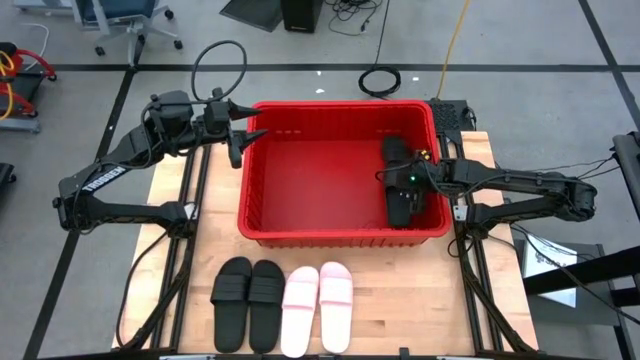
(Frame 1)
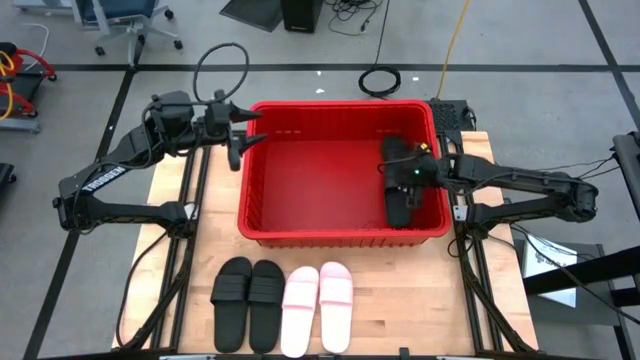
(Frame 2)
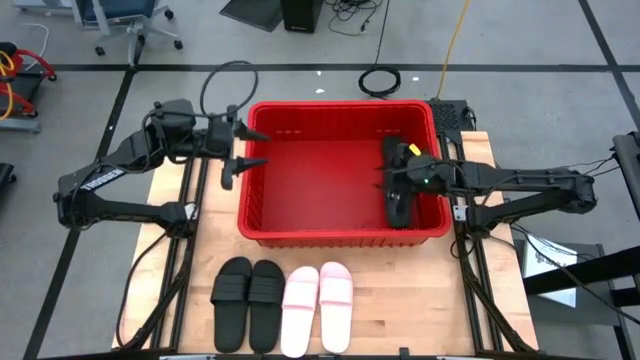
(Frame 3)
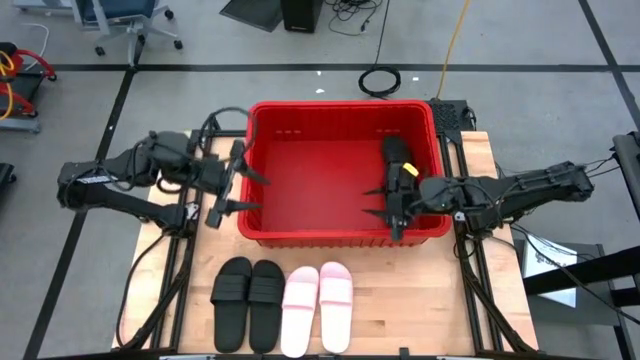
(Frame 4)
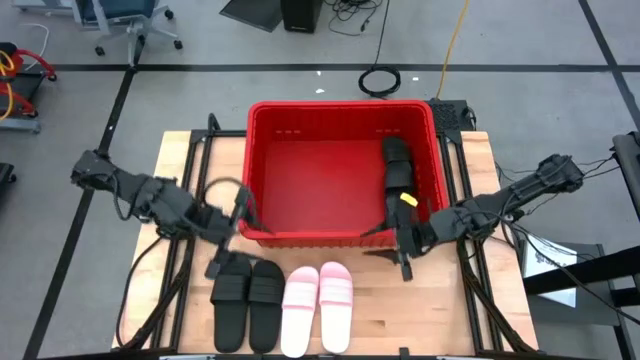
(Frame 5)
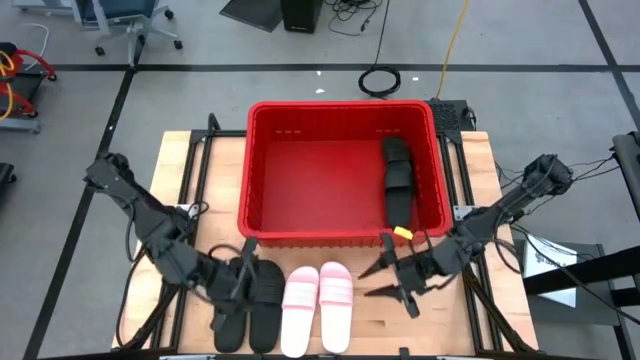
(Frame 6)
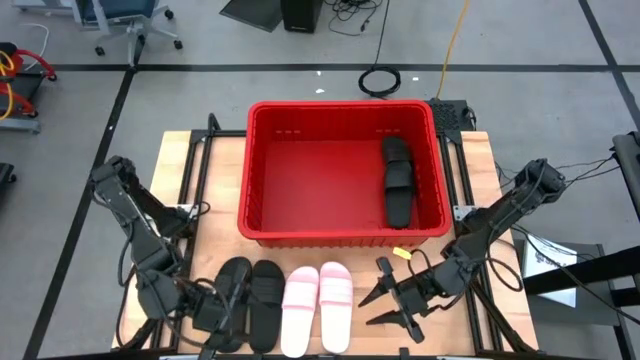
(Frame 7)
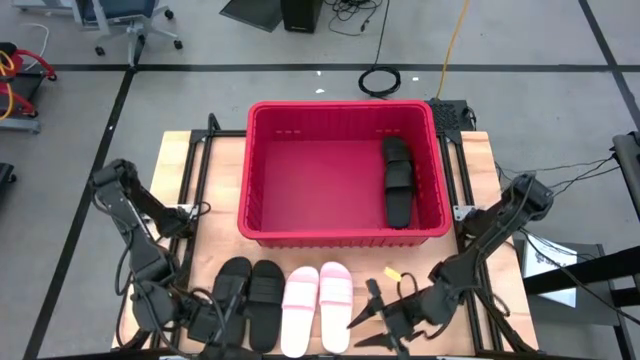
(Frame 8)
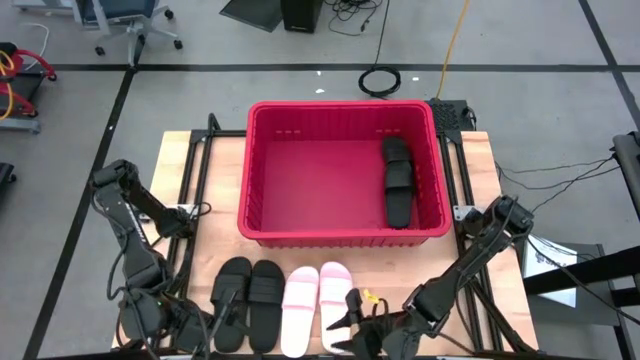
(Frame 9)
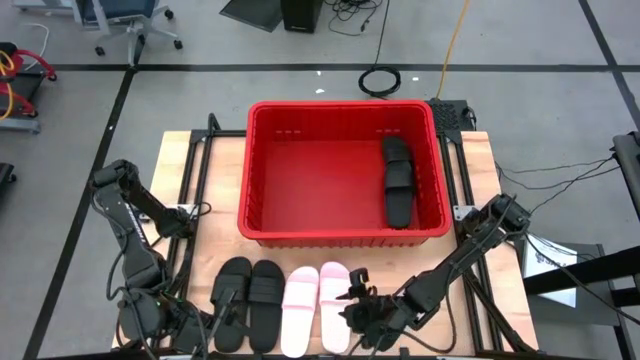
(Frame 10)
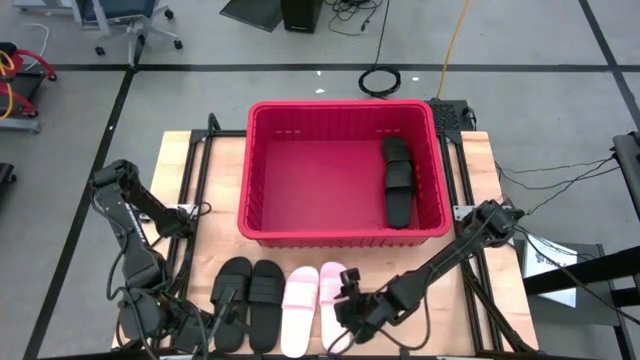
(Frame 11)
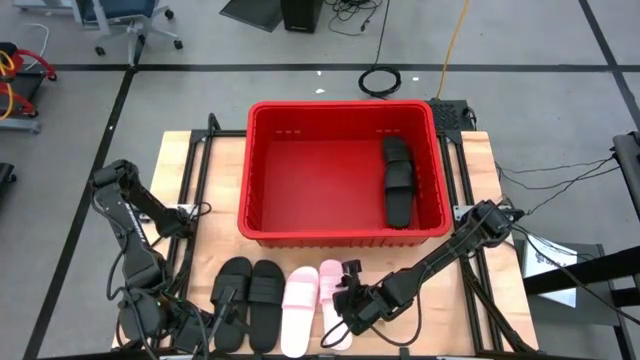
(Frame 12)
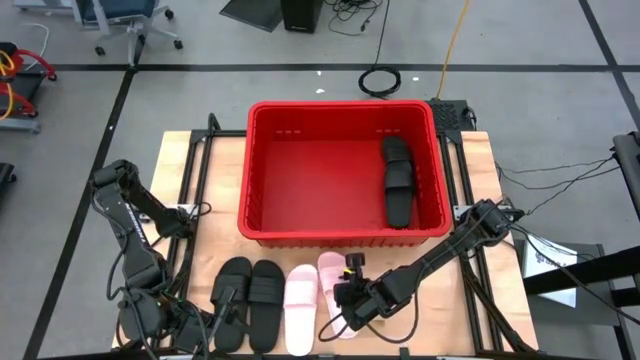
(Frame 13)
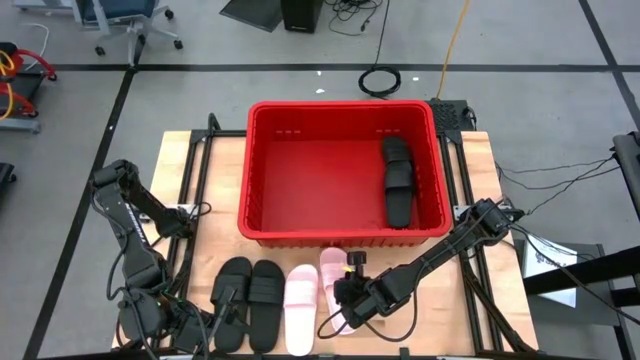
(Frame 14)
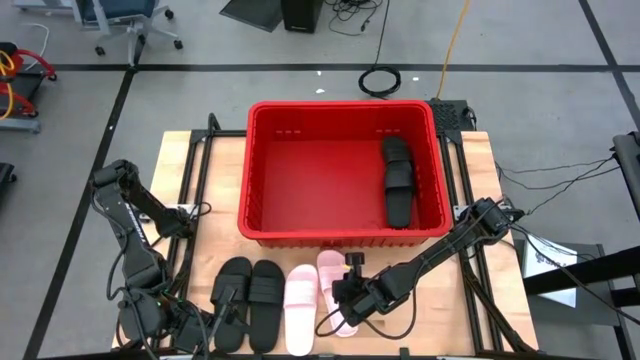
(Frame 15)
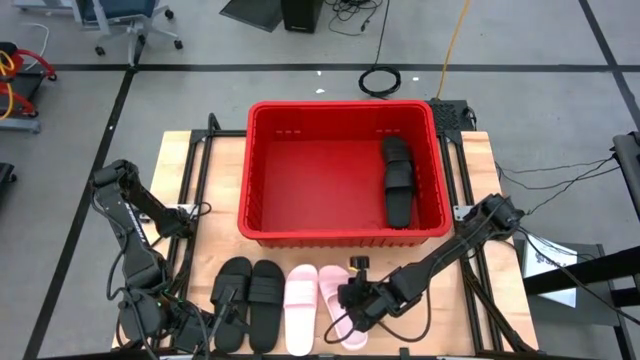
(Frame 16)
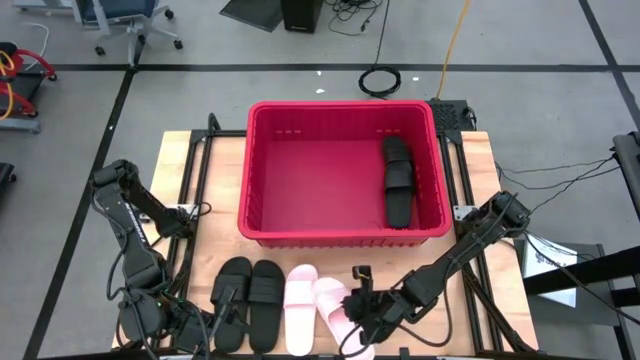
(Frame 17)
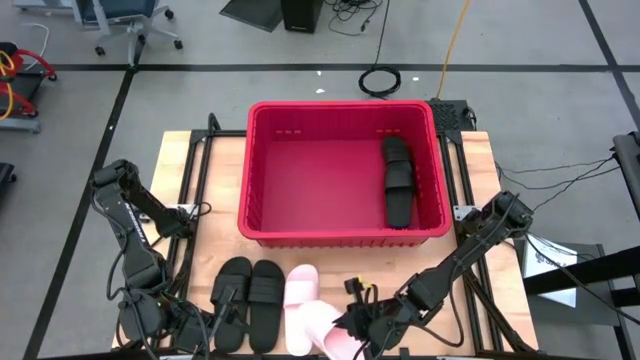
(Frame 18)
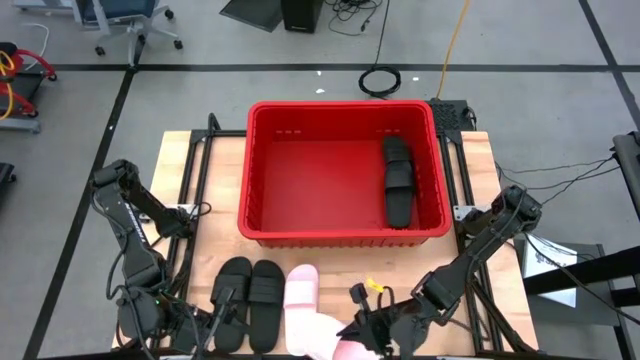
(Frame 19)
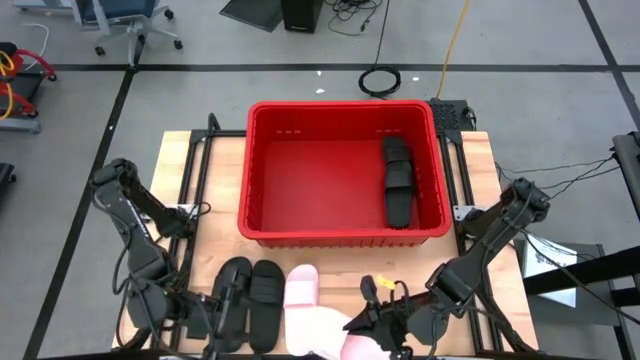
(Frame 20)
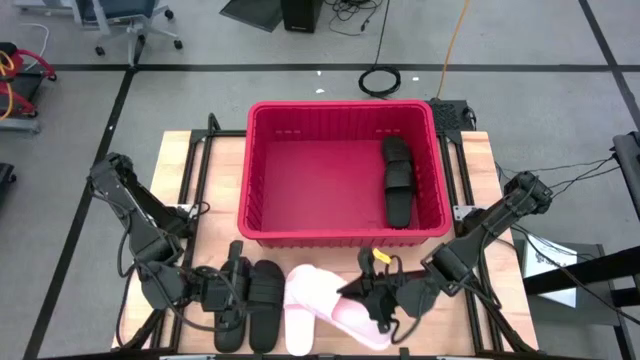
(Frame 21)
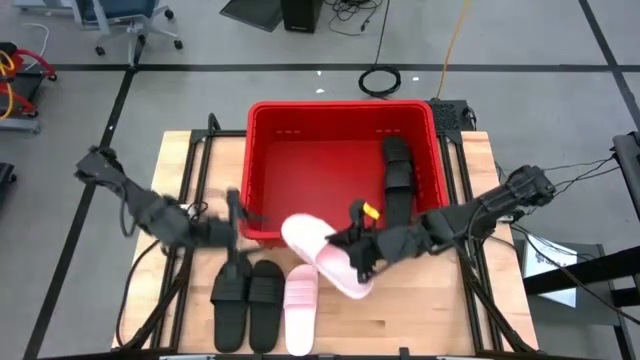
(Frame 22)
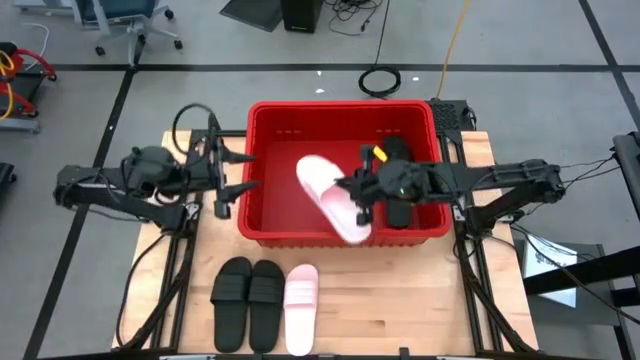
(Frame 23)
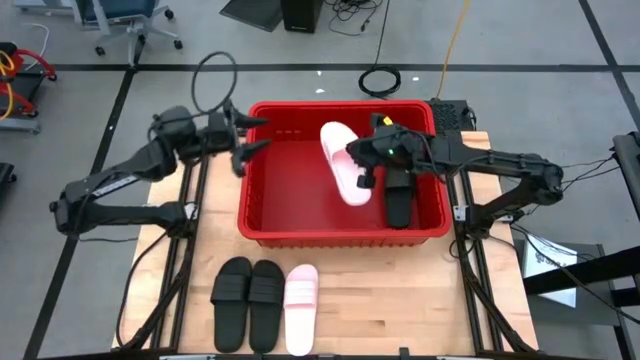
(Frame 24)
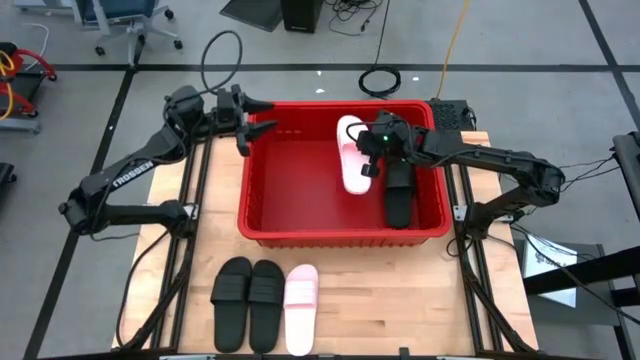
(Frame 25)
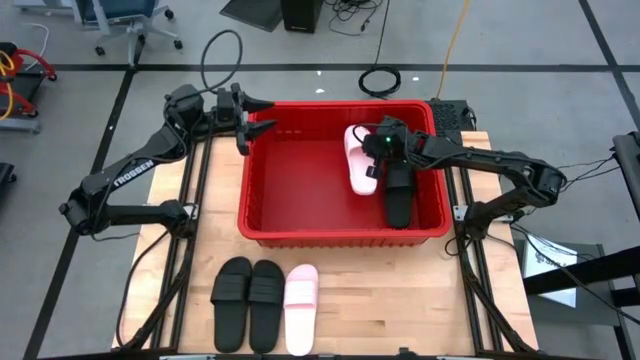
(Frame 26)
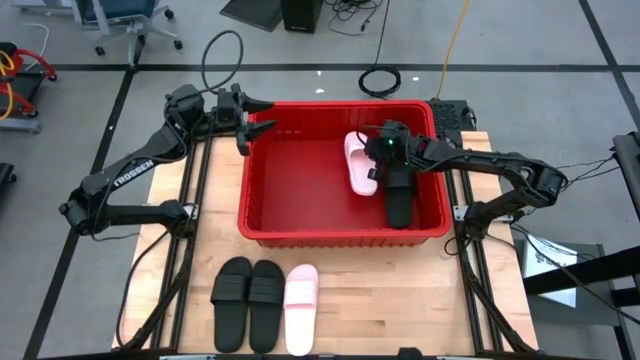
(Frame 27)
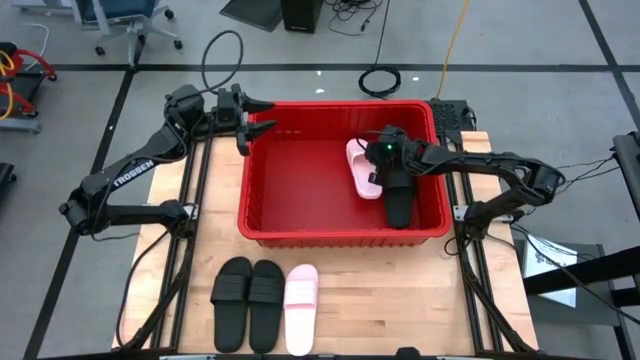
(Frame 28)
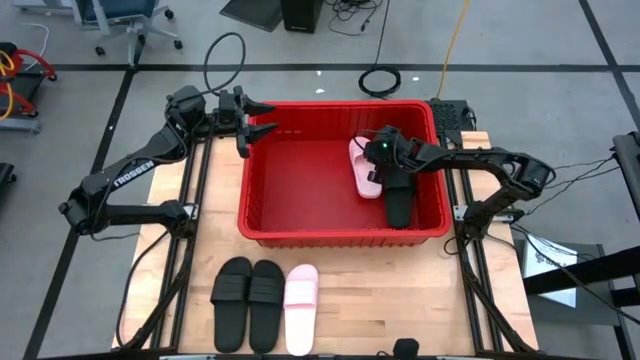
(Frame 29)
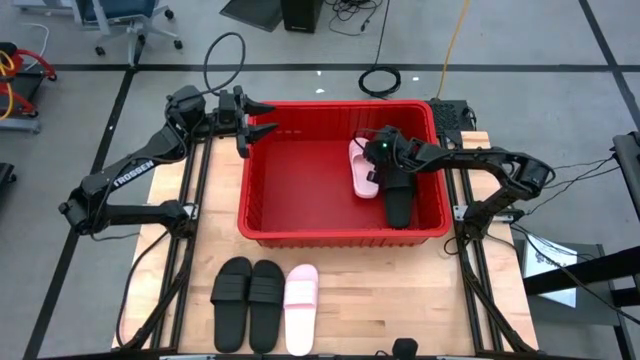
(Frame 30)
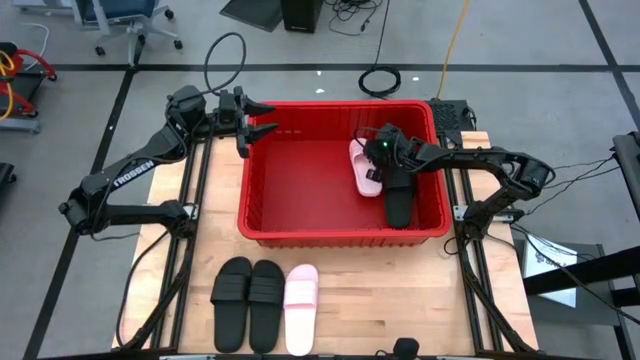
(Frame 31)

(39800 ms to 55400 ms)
Task: Pick and place slides into bin
Put the pink slide into the red organizer bin

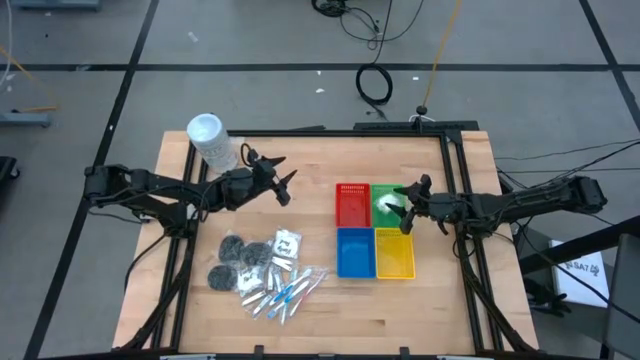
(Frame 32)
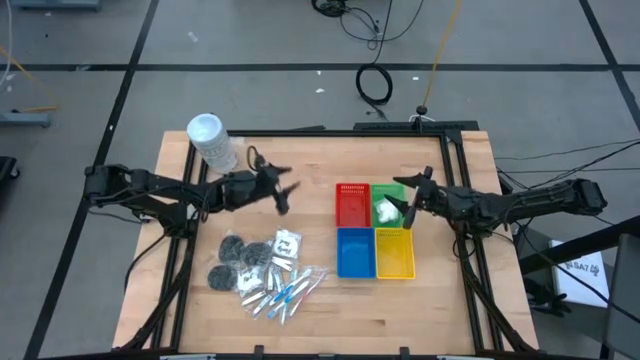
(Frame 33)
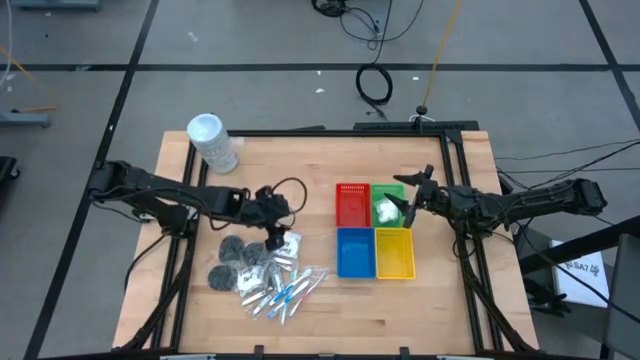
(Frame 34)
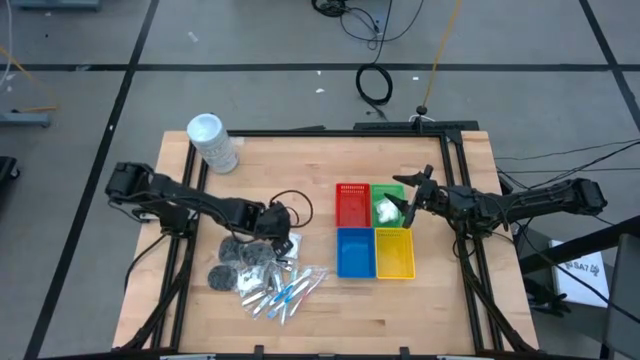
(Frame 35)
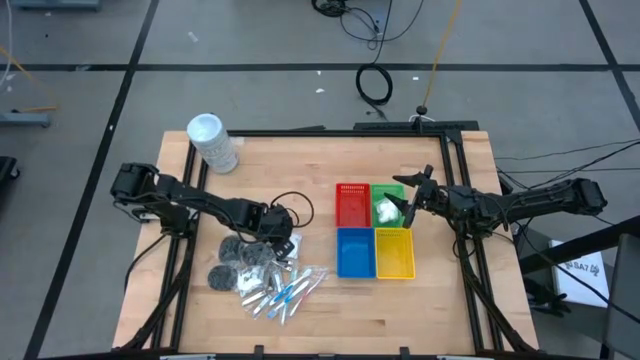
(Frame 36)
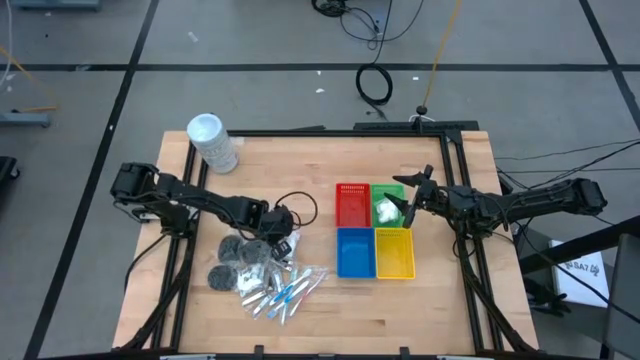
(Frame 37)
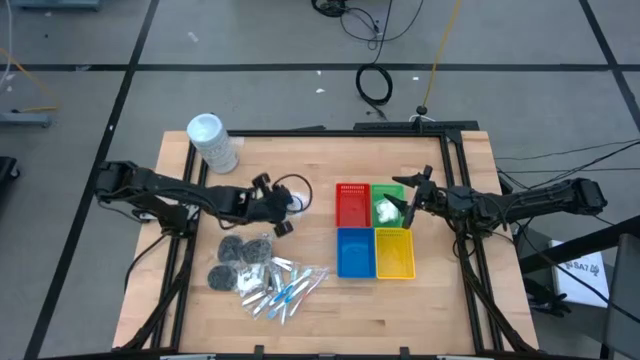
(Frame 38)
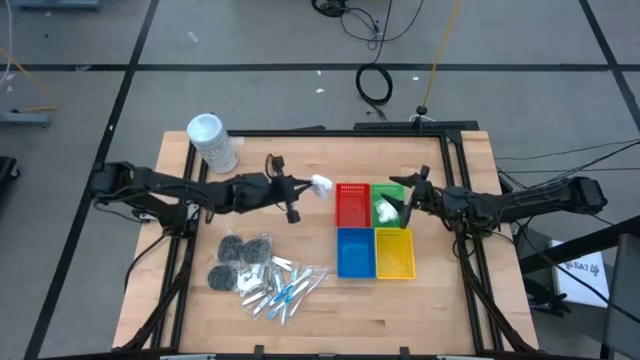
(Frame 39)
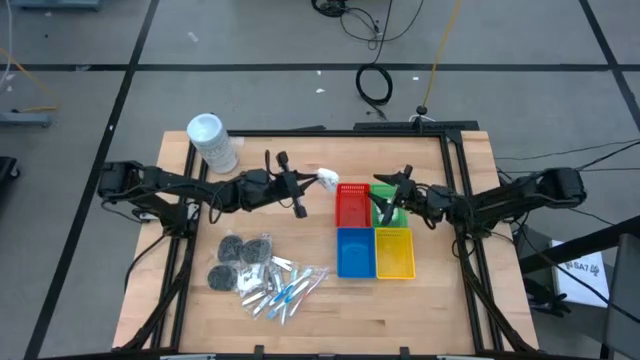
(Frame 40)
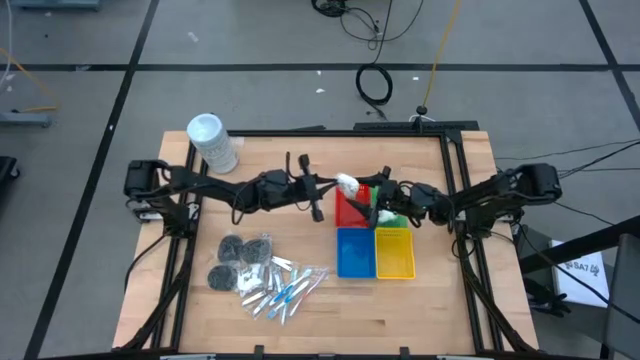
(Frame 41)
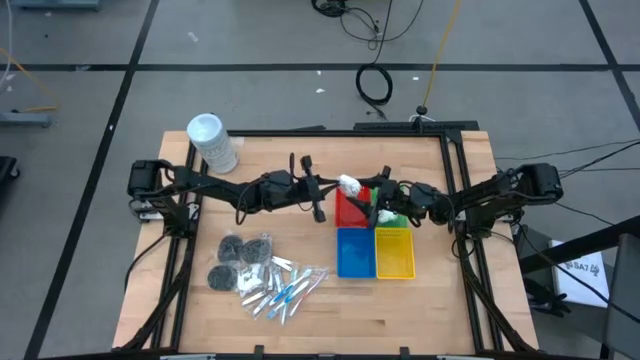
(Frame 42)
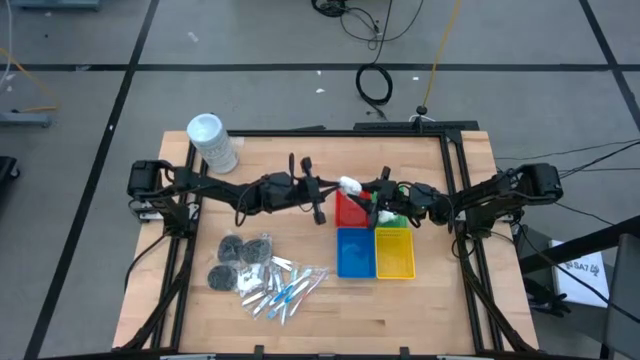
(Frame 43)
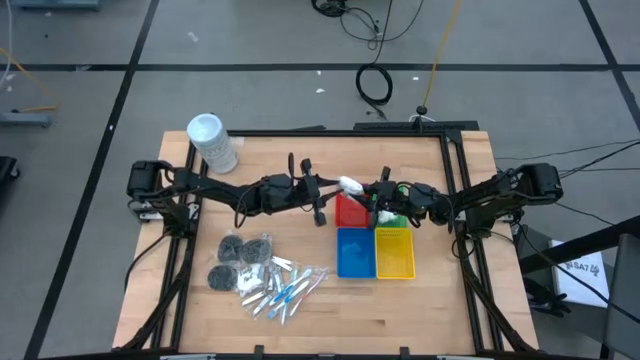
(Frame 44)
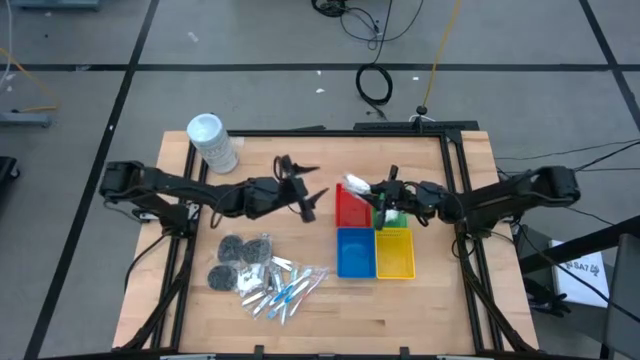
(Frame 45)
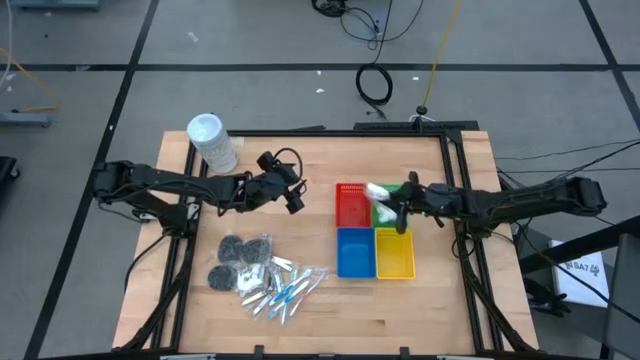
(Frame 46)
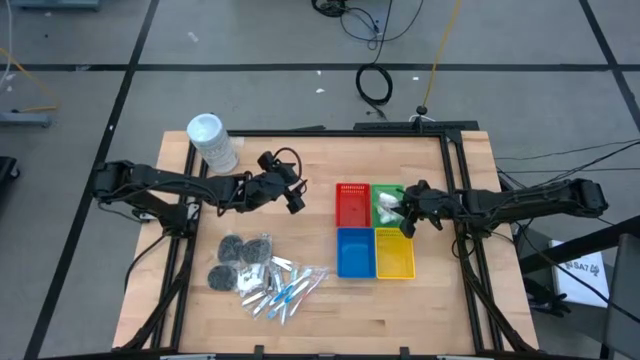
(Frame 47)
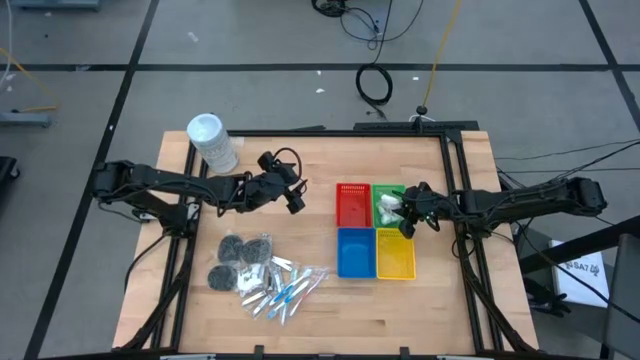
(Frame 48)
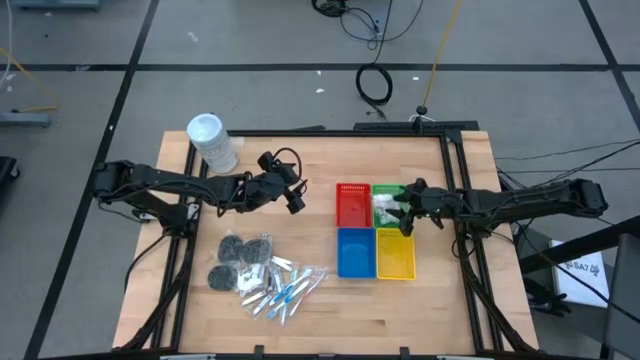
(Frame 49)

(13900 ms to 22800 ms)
Task: Pick & Place Travel size toiletries
Put the cotton pack into the green bin
